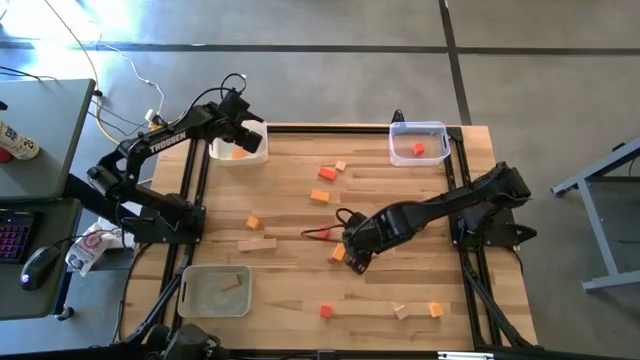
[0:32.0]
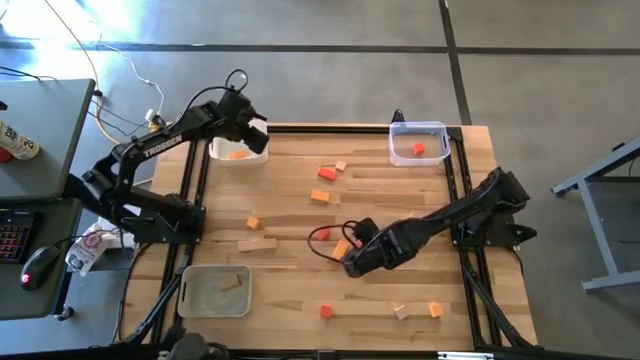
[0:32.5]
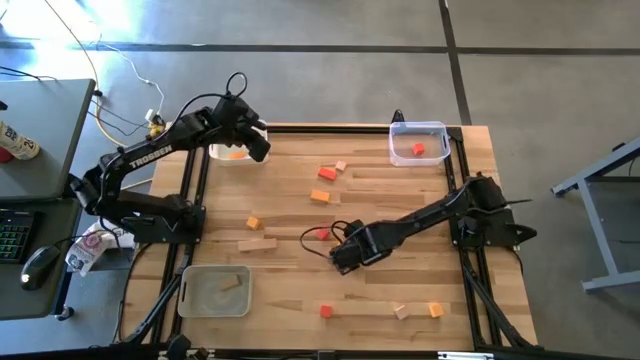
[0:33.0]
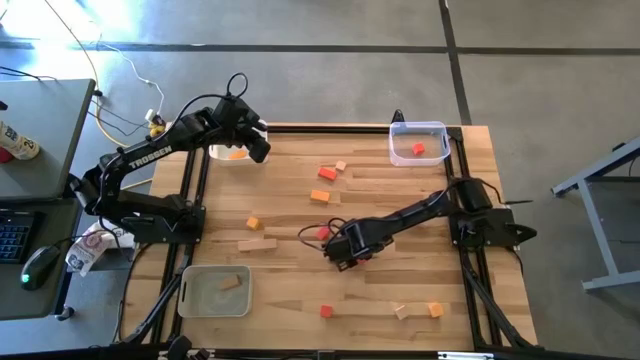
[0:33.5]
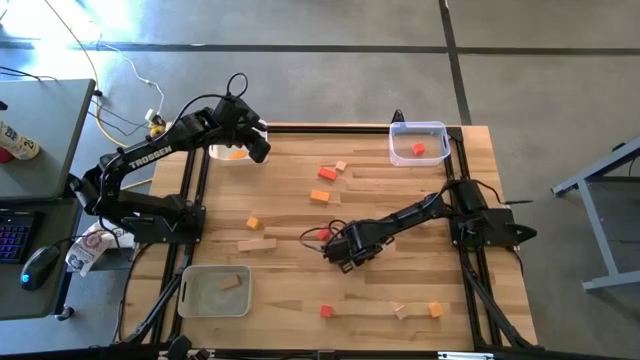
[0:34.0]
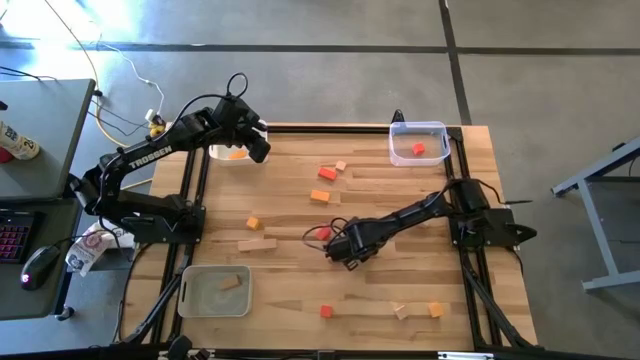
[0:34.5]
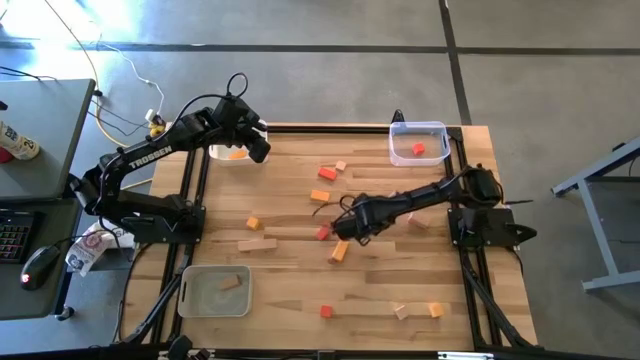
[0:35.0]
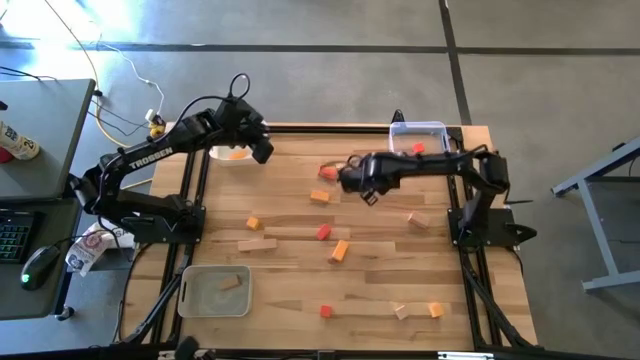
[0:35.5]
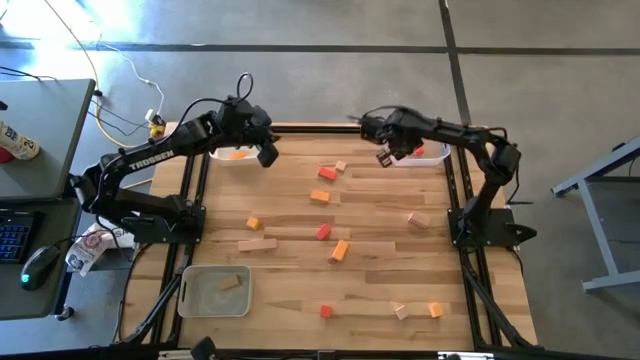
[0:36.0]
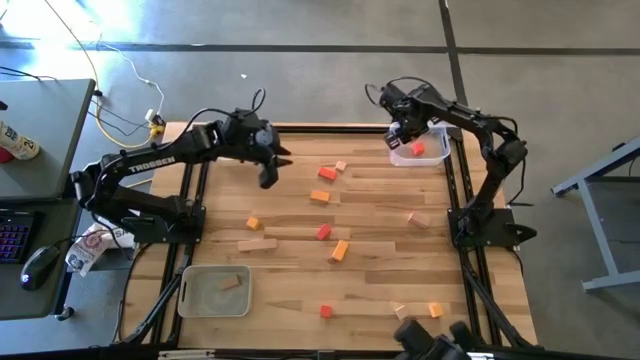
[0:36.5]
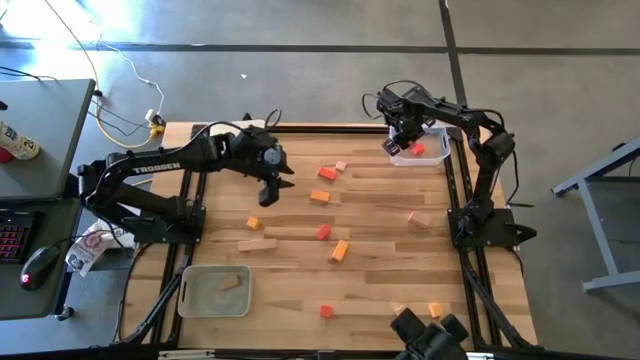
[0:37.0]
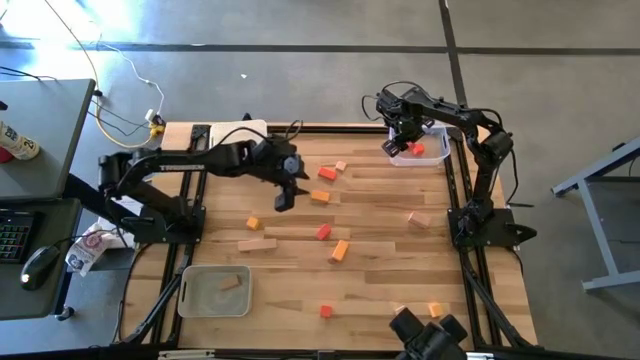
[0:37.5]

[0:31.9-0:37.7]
Task: Sort & place blocks by color
Put the orange block into the transparent bin

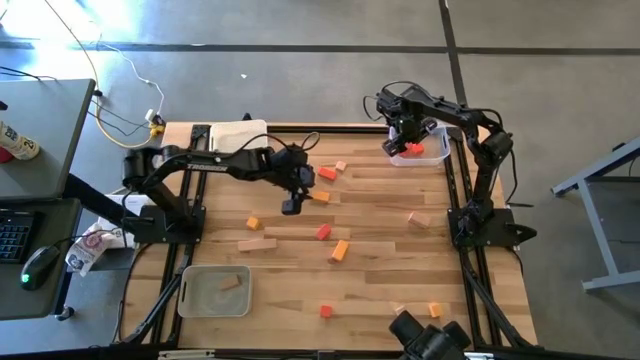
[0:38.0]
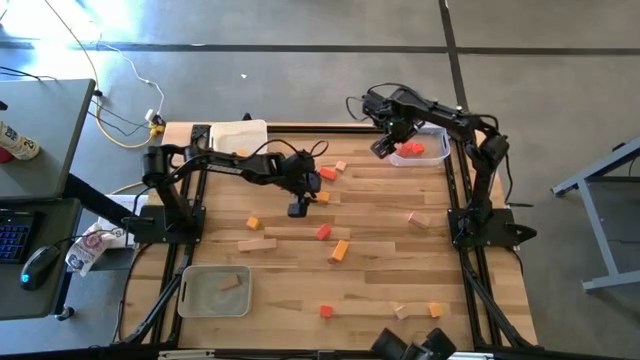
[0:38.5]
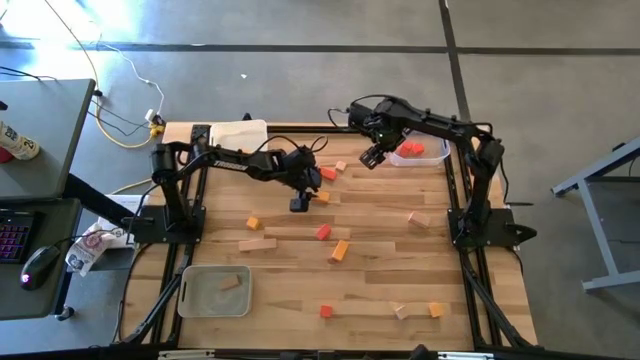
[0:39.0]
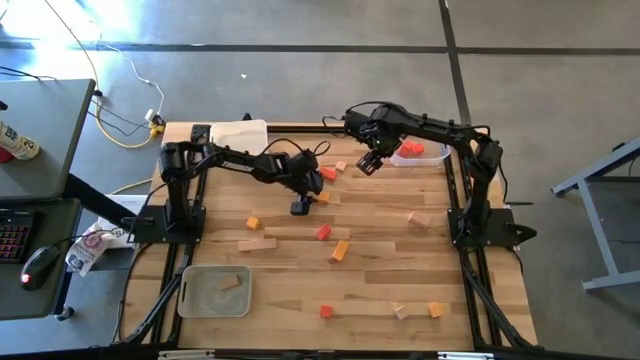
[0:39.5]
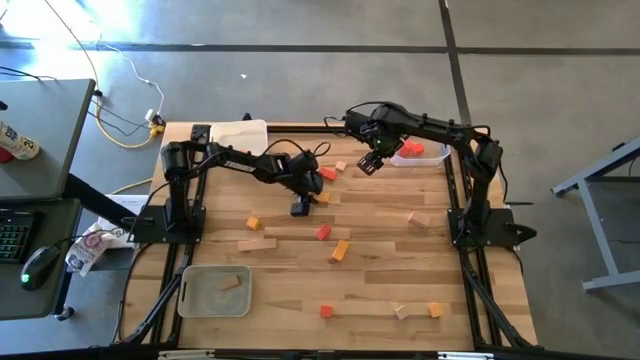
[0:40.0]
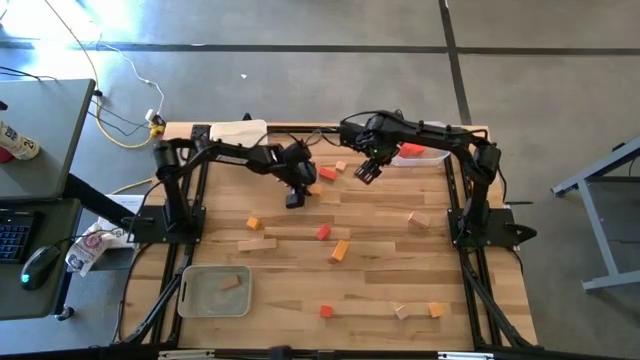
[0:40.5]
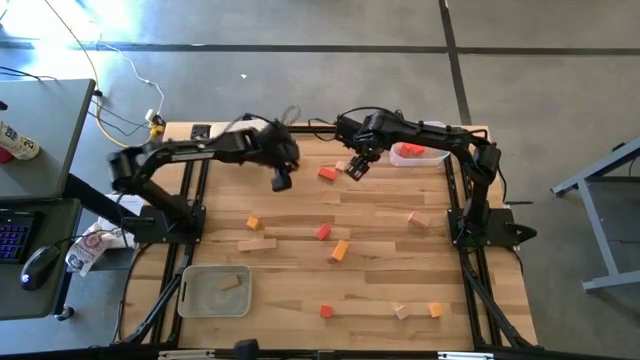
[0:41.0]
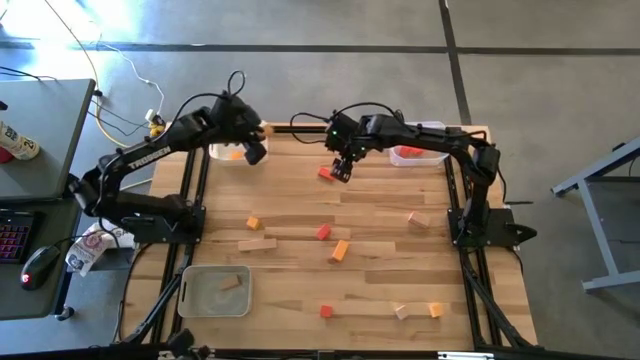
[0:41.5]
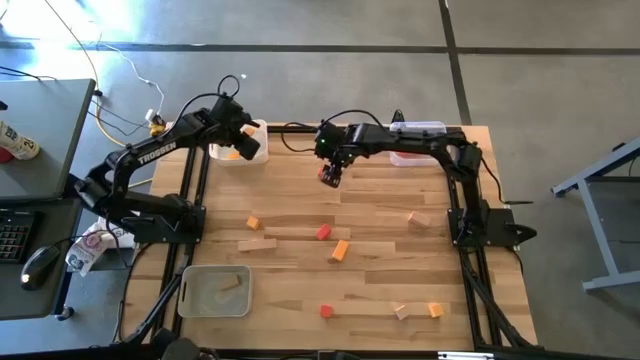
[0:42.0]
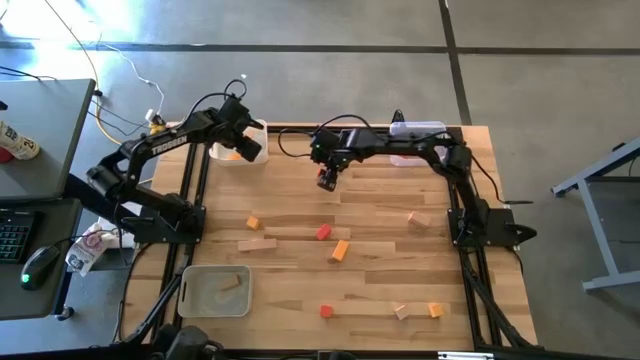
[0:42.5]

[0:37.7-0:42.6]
Put the yellow block into the white bin

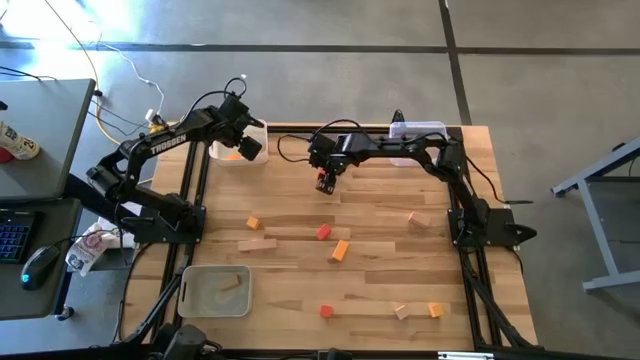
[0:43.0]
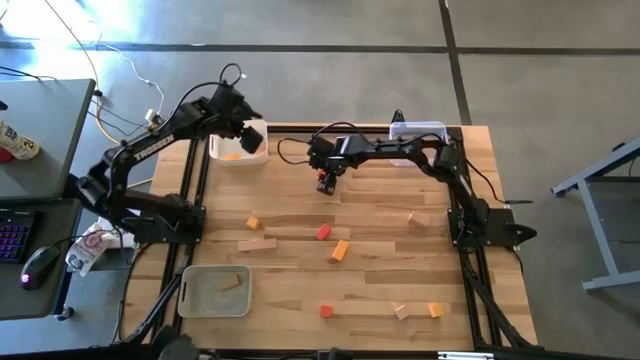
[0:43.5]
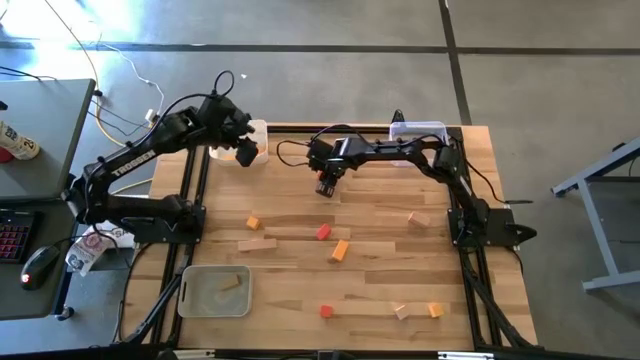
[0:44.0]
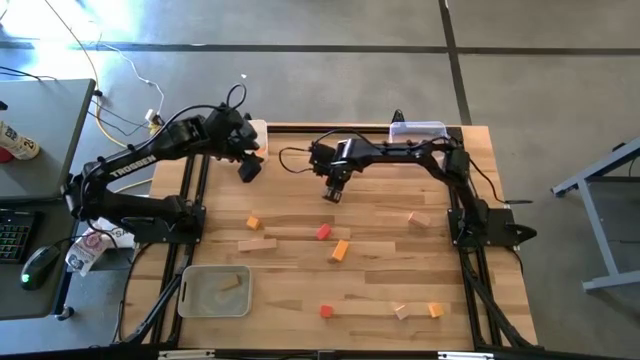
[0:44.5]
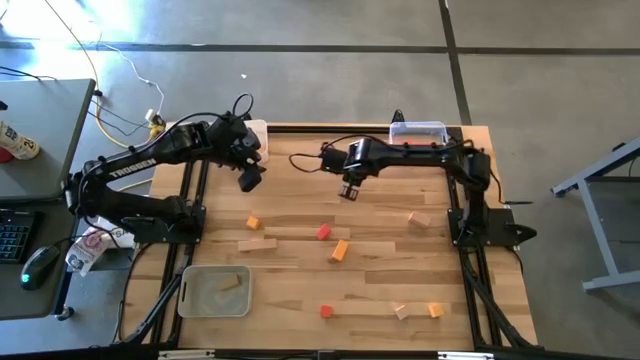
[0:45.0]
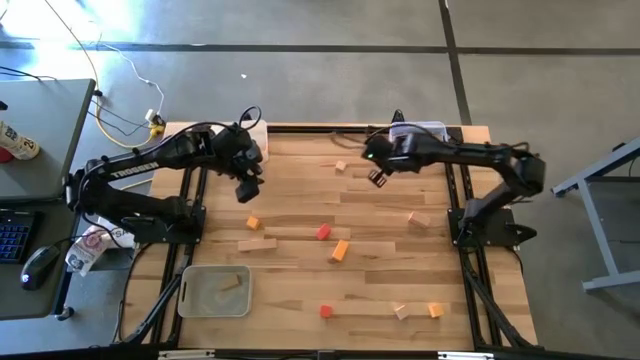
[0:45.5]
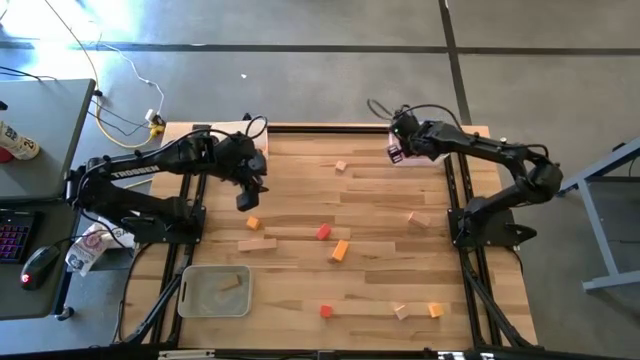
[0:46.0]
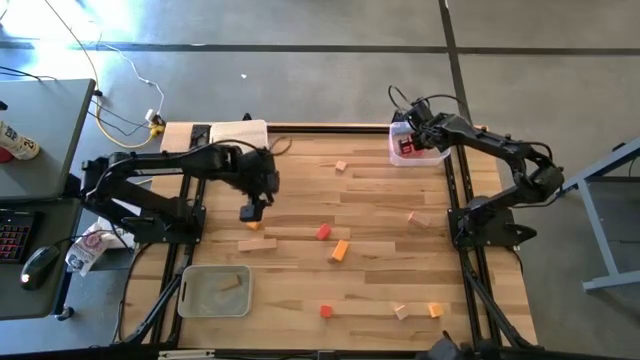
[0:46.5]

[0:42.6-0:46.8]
Put the orange block into the transparent bin

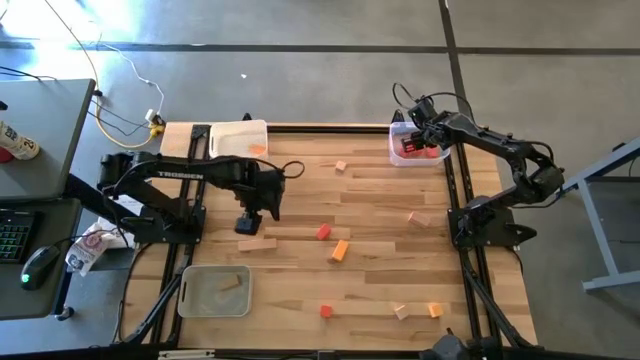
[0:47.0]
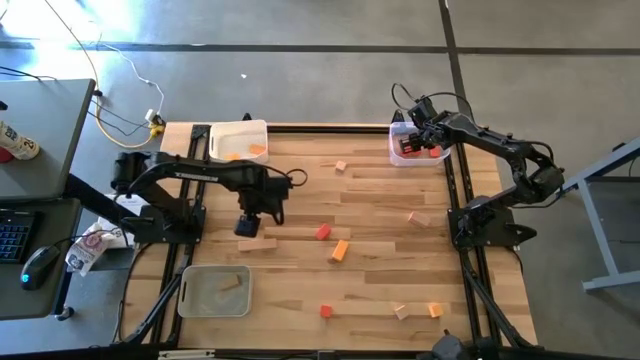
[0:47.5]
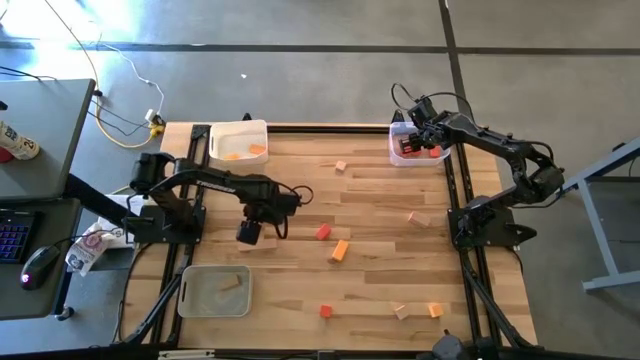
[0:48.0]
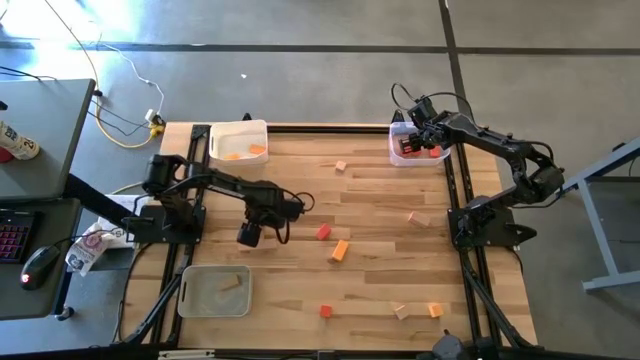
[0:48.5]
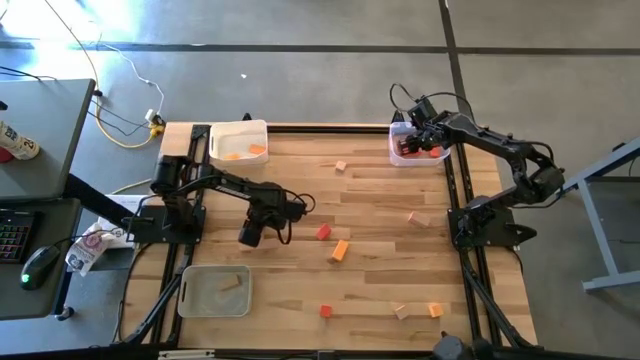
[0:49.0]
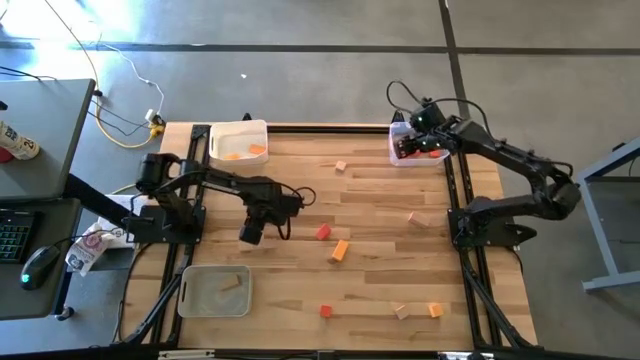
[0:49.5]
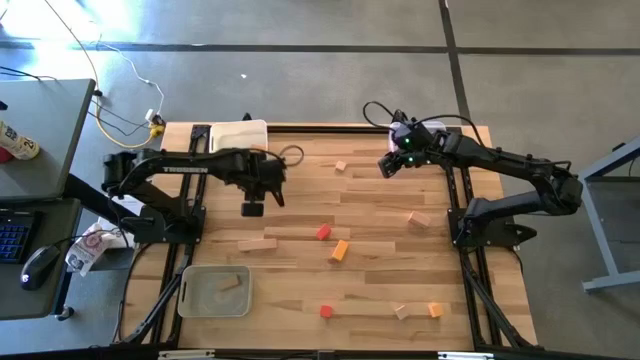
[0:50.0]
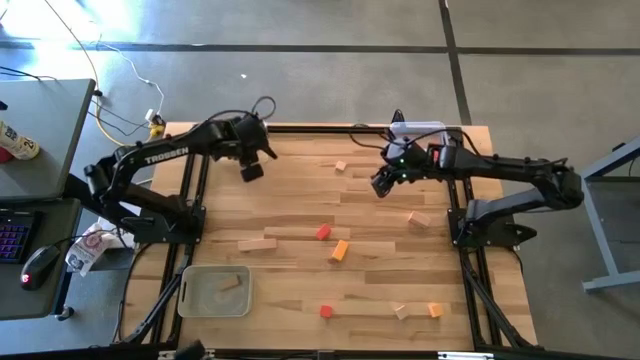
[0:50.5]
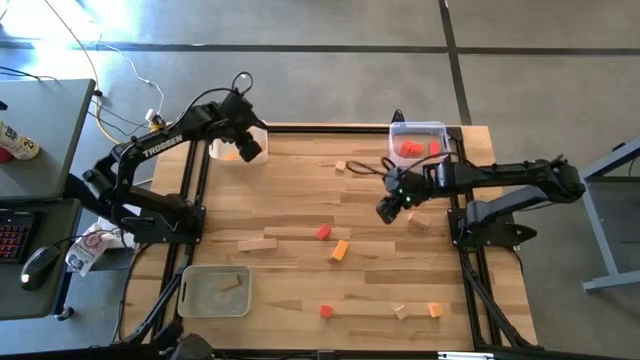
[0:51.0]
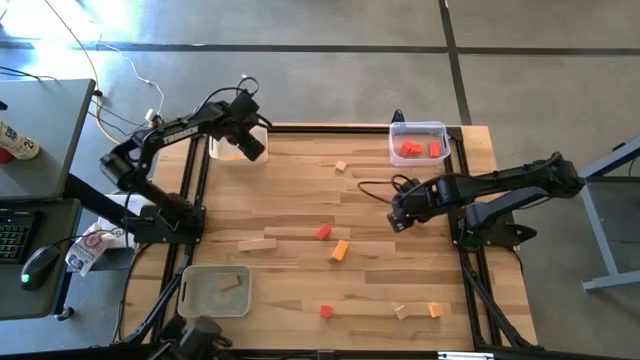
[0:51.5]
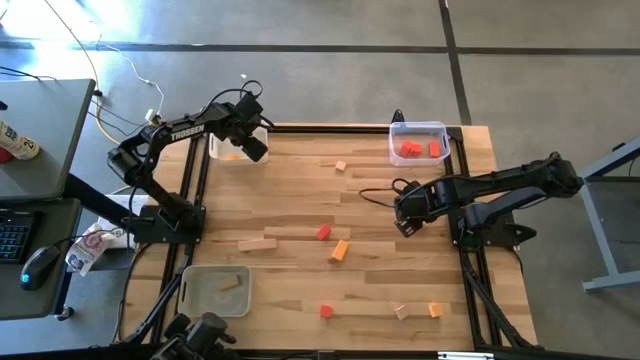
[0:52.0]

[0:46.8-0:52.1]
Put the yellow block into the white bin
